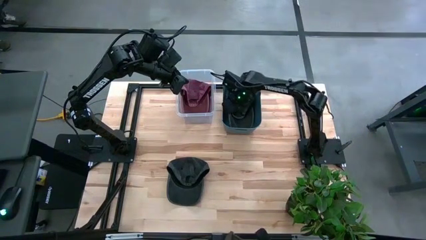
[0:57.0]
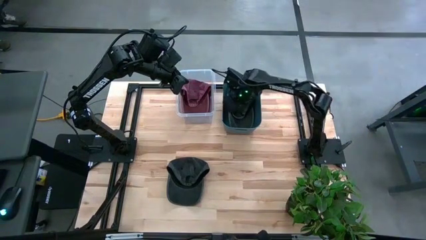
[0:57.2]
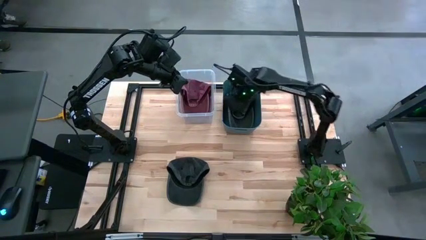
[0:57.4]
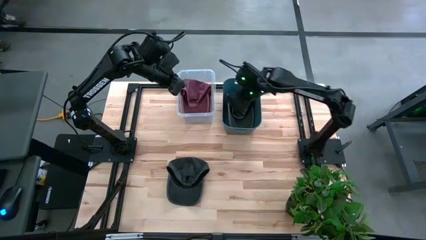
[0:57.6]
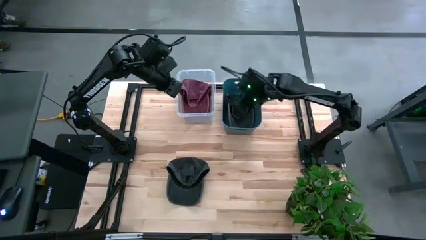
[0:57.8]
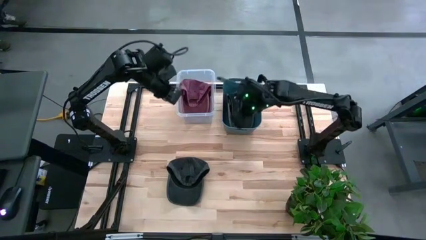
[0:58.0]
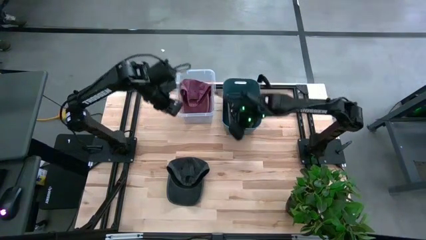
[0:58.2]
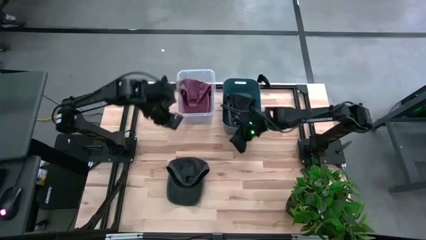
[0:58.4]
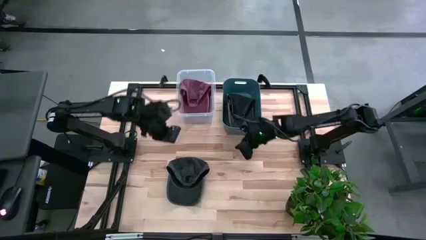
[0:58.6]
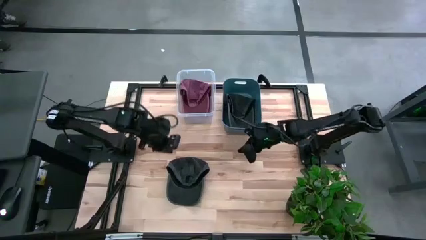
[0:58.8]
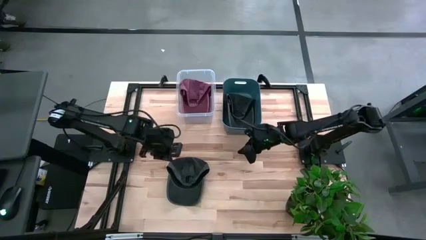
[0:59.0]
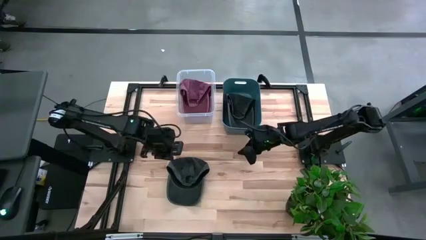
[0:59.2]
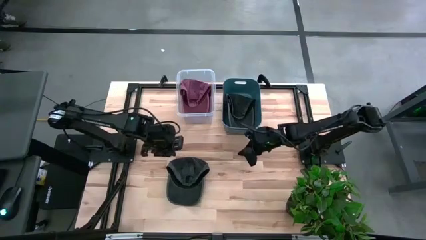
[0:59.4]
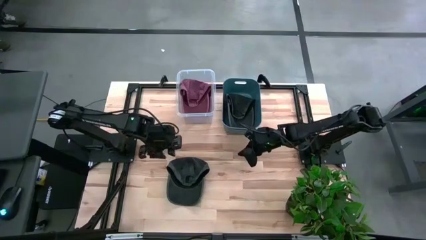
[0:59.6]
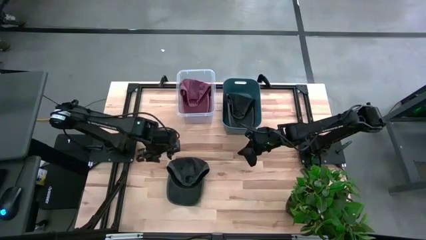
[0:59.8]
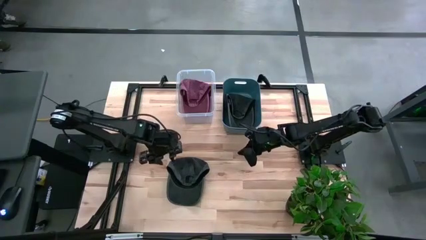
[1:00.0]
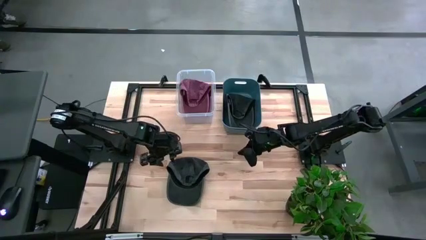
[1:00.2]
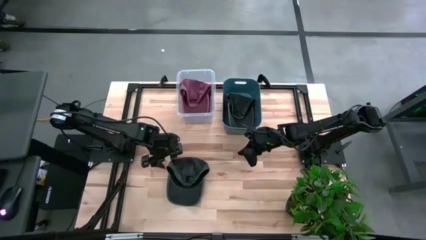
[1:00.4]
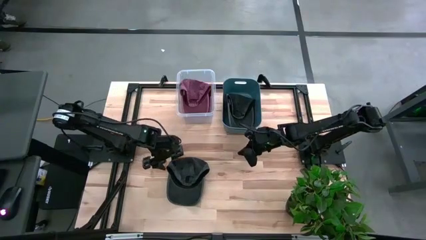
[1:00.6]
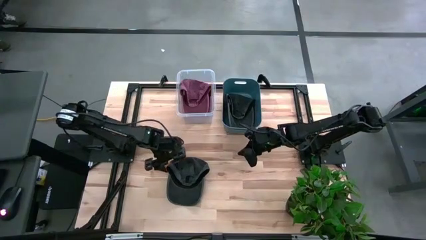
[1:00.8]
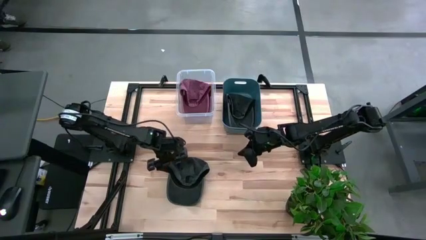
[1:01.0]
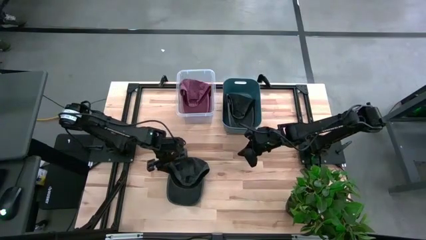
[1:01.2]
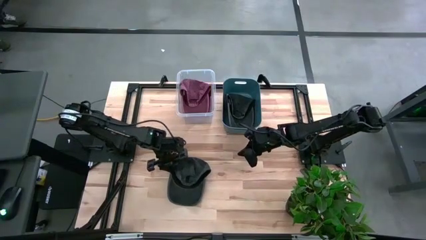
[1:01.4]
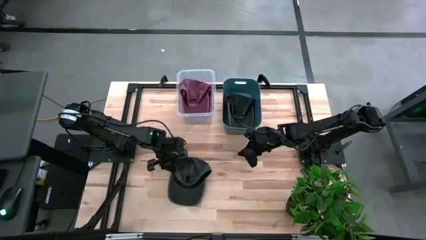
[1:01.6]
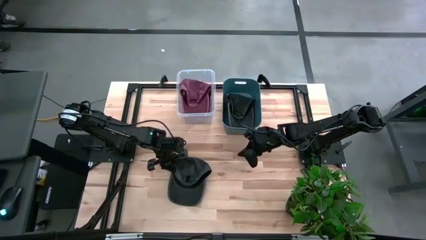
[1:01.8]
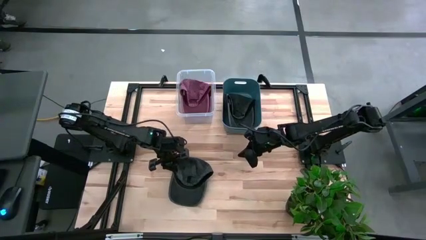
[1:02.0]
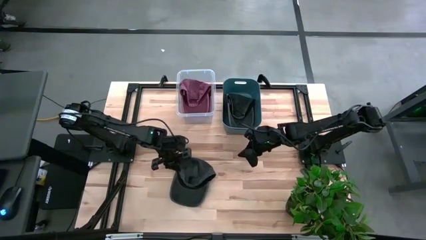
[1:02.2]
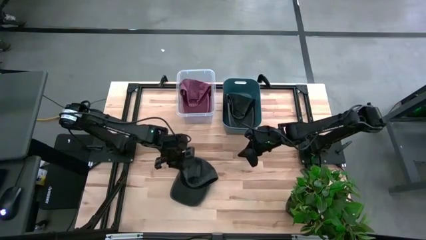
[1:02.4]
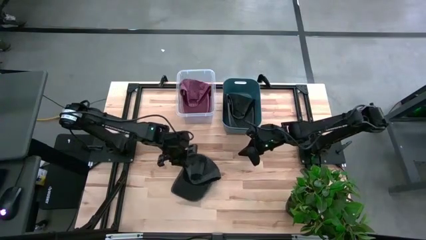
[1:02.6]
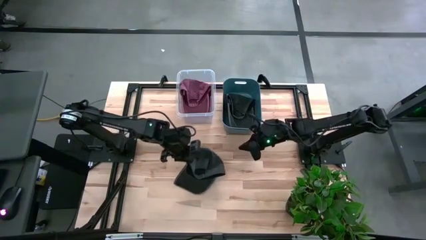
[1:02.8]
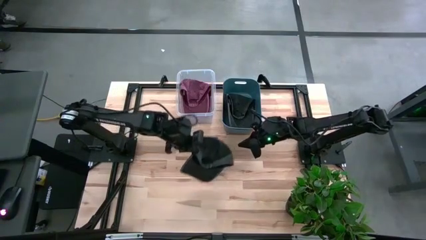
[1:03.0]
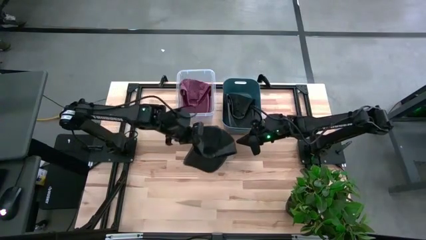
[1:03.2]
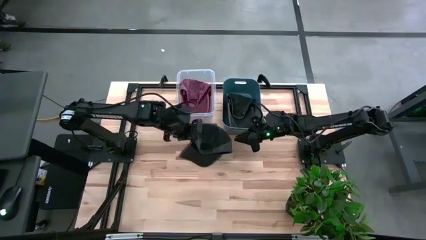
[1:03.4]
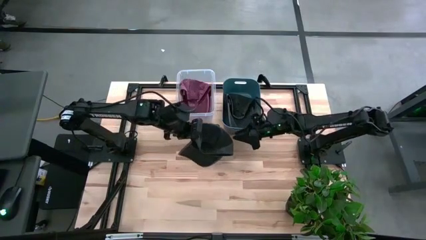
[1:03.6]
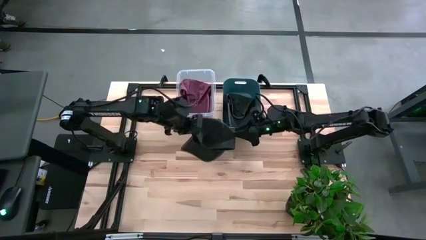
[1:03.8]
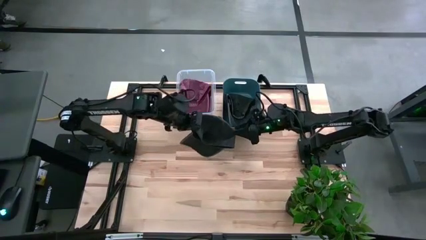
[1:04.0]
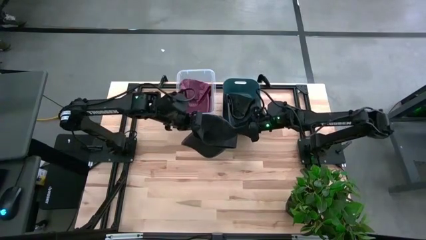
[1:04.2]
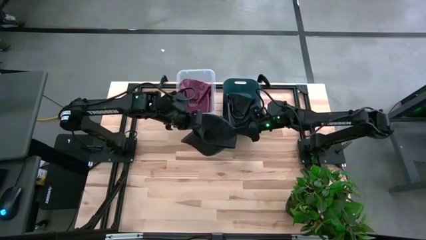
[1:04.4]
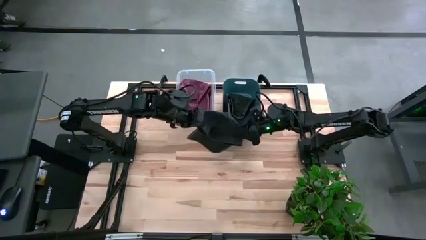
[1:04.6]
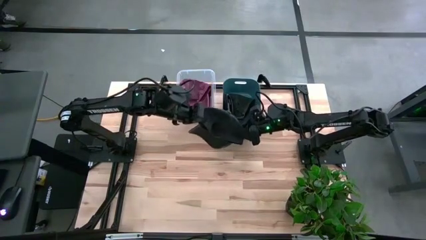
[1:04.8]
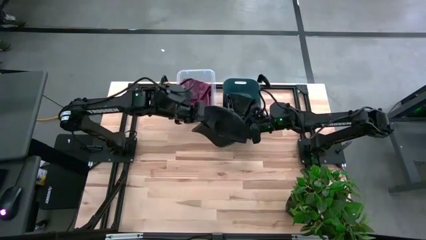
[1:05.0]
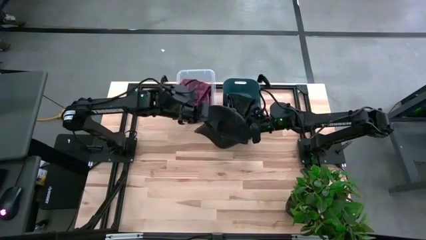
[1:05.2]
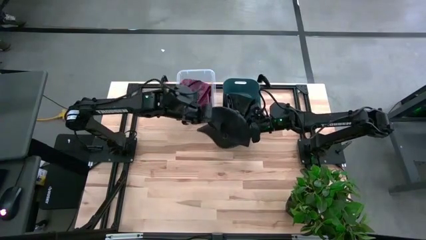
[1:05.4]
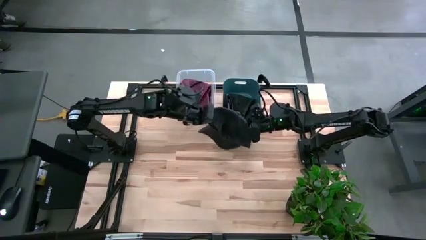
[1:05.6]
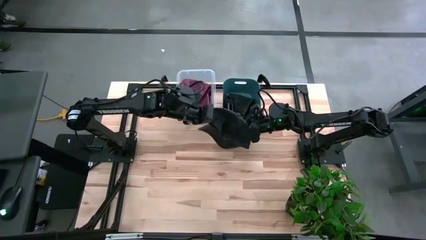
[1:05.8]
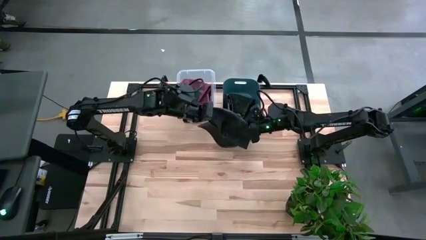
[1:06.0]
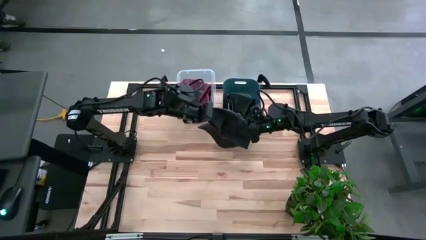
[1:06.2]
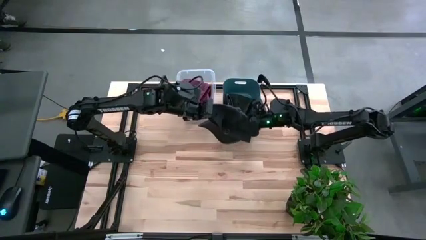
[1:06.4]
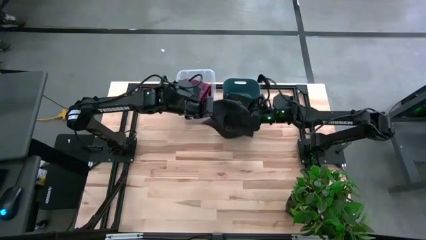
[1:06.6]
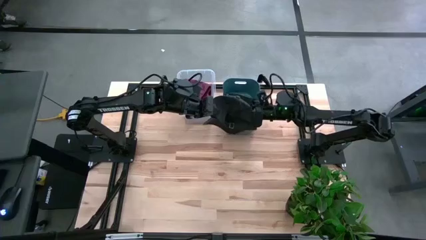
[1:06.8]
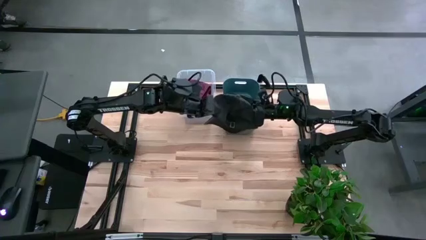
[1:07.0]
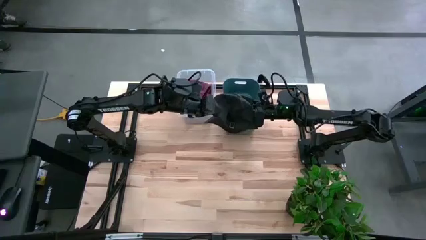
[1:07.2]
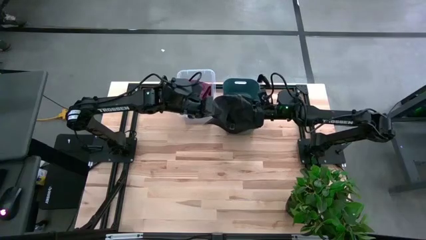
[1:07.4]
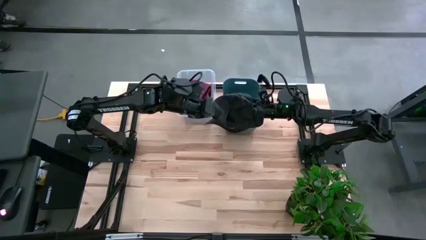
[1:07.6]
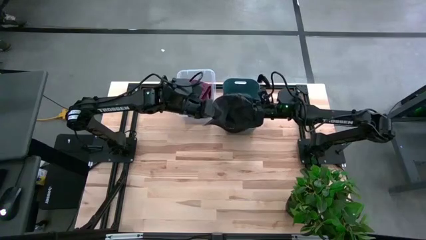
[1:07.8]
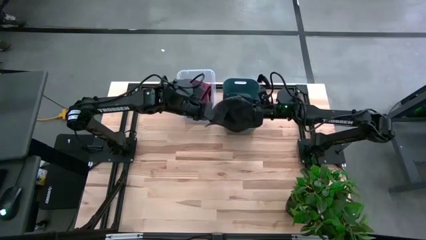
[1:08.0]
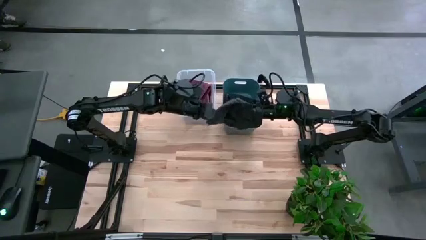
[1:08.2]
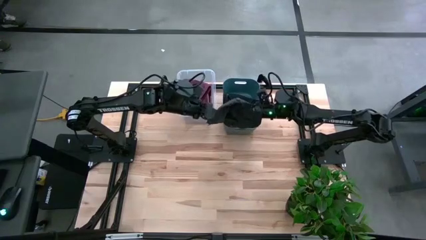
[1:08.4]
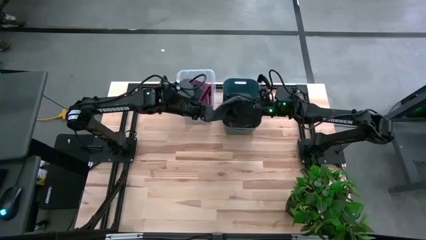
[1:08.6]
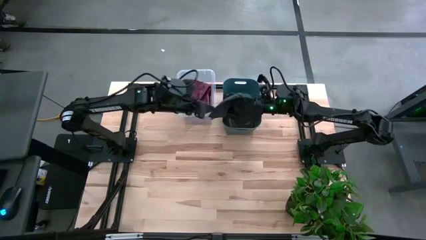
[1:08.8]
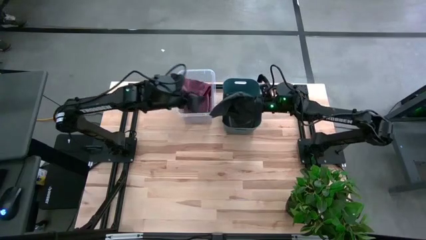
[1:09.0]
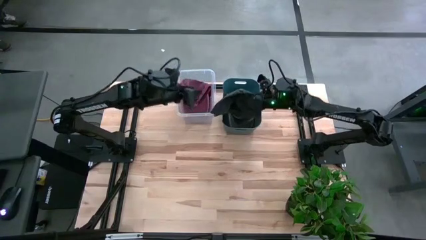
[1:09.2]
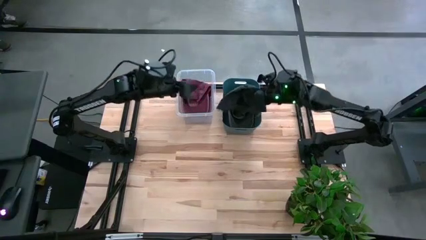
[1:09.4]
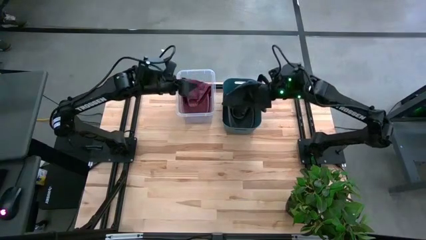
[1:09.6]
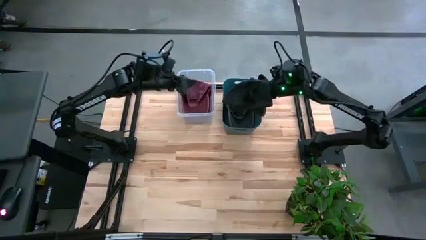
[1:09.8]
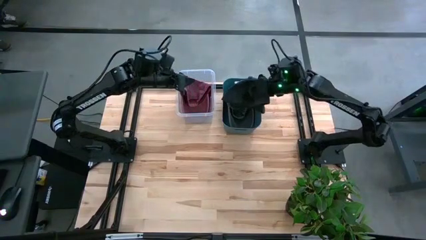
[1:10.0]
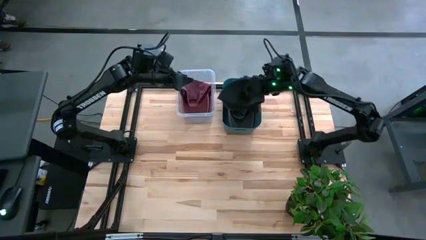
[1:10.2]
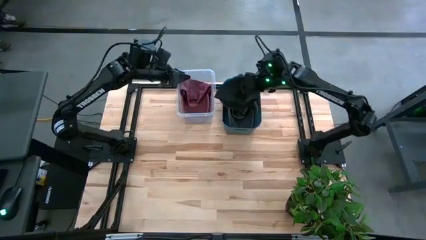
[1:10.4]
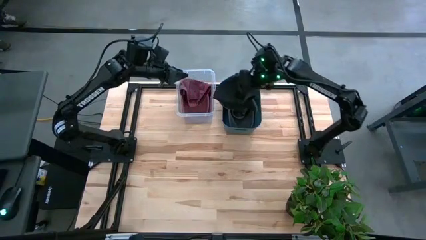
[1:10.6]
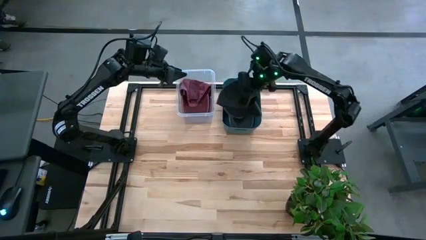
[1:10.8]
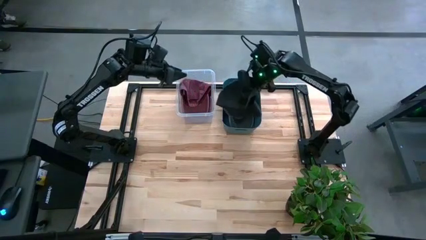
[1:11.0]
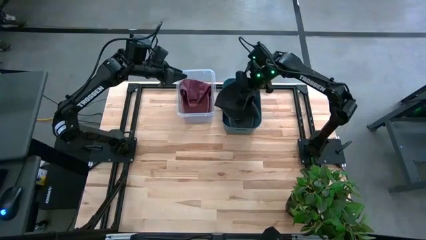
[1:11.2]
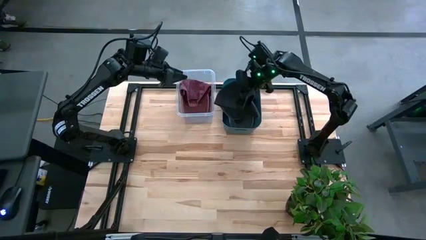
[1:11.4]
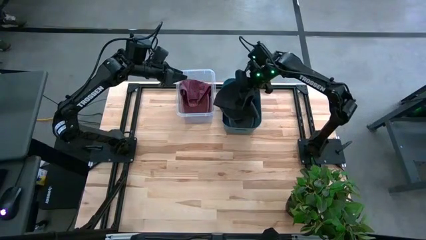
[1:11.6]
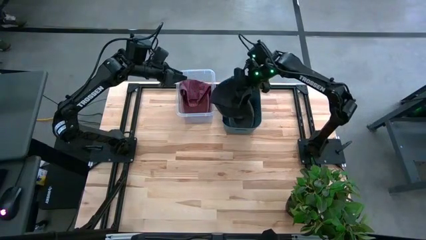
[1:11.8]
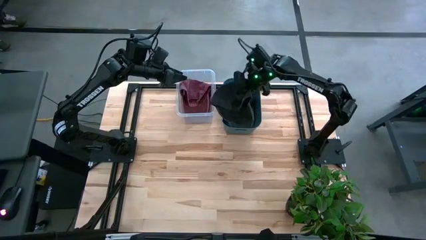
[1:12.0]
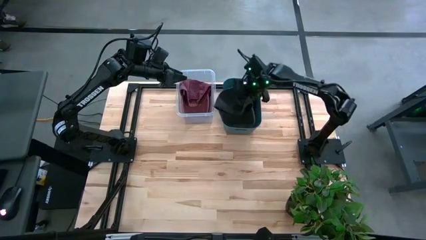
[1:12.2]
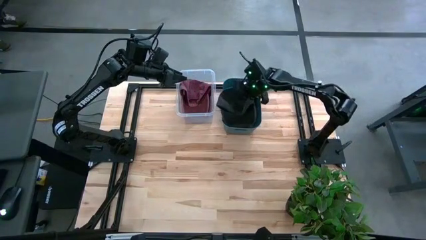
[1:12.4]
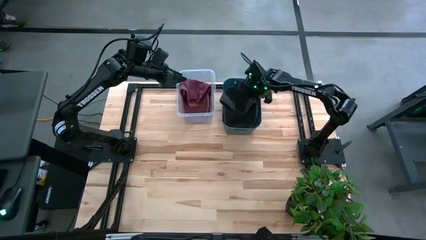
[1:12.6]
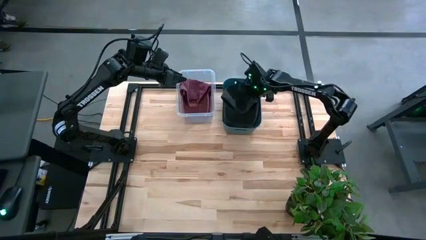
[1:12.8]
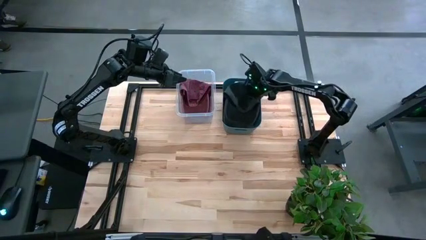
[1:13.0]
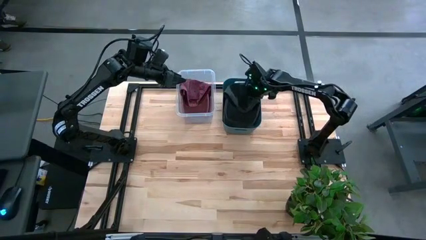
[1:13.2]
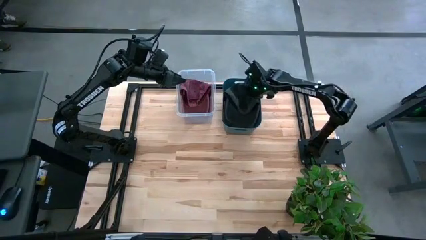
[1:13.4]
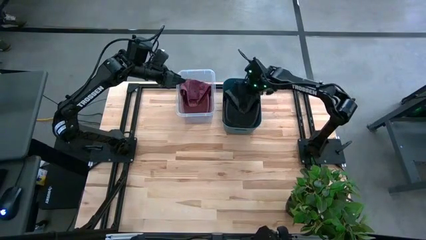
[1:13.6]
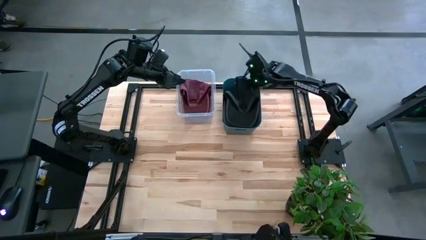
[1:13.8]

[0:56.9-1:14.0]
Task: Pick & Place hat
Put the black cap into the green bin
